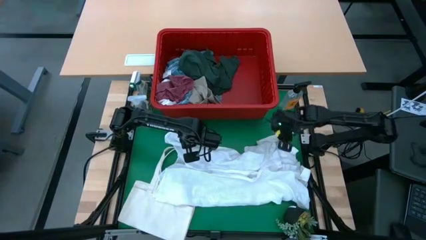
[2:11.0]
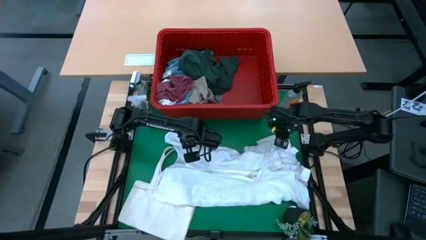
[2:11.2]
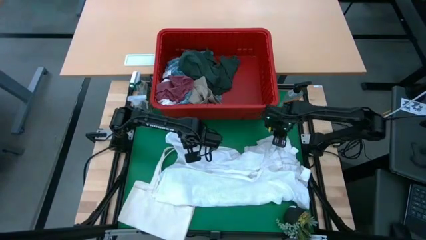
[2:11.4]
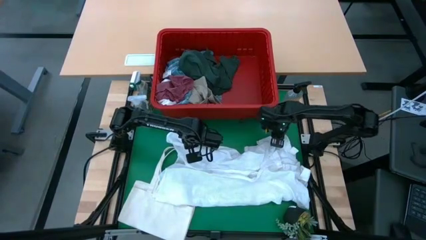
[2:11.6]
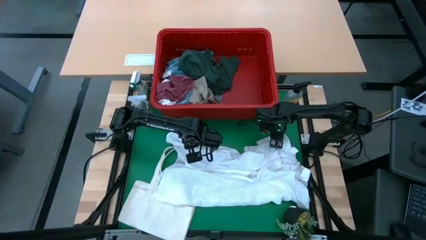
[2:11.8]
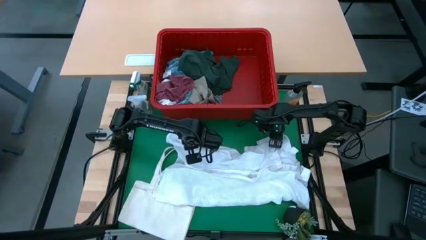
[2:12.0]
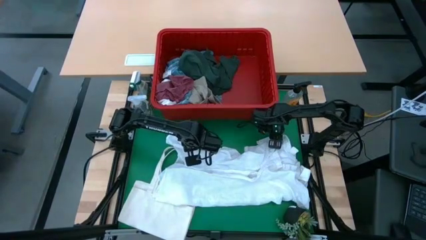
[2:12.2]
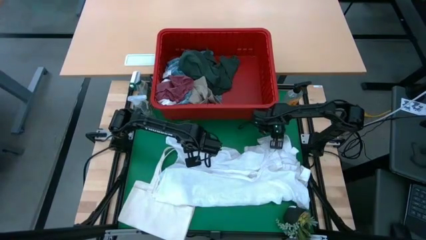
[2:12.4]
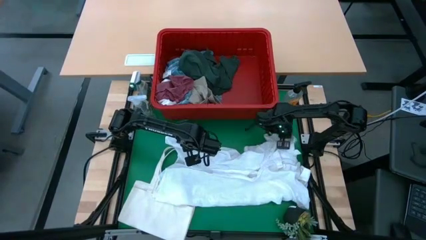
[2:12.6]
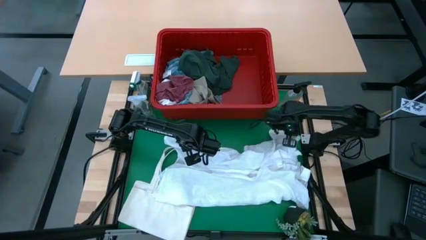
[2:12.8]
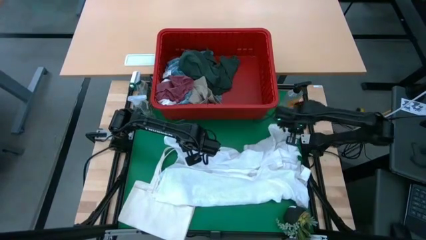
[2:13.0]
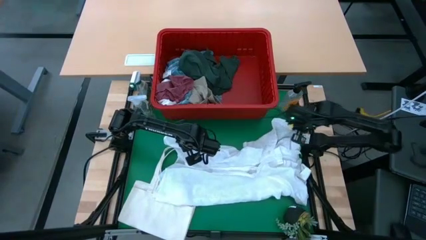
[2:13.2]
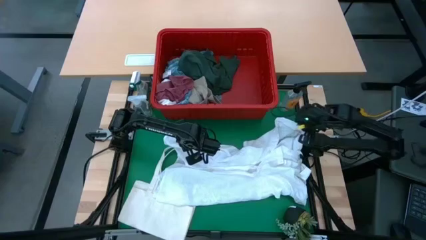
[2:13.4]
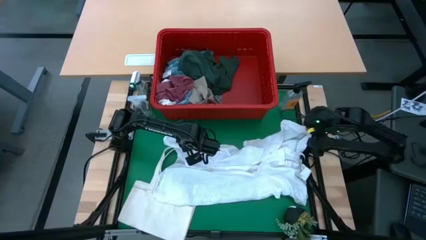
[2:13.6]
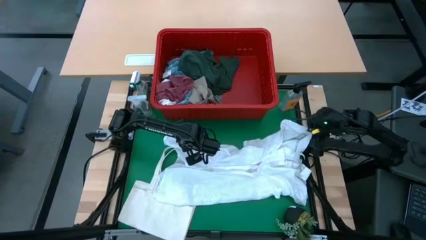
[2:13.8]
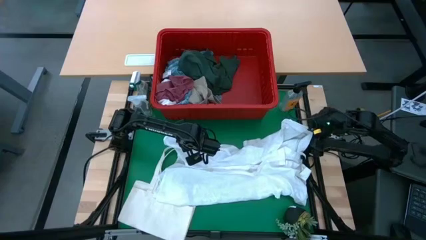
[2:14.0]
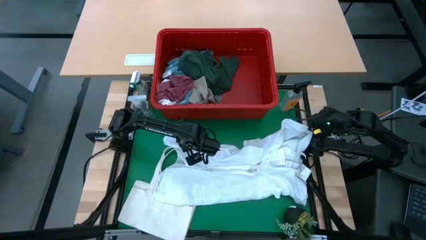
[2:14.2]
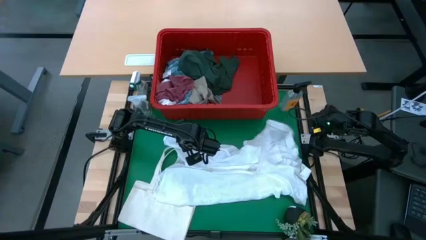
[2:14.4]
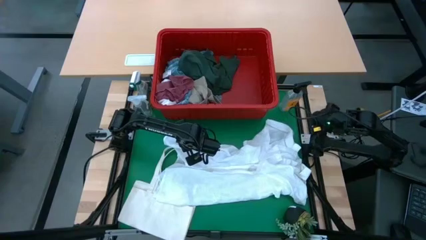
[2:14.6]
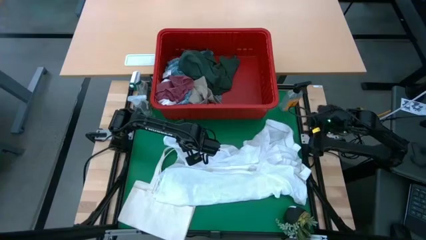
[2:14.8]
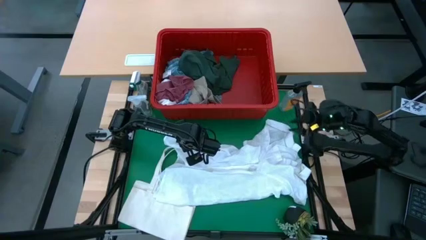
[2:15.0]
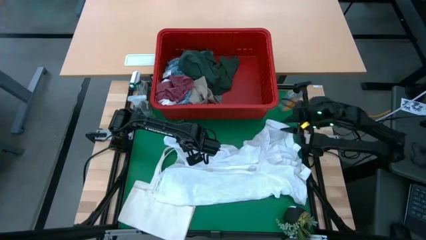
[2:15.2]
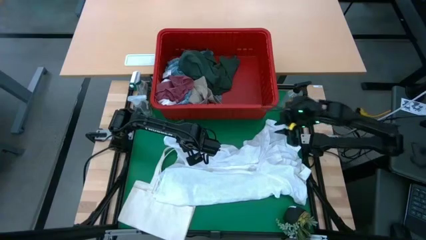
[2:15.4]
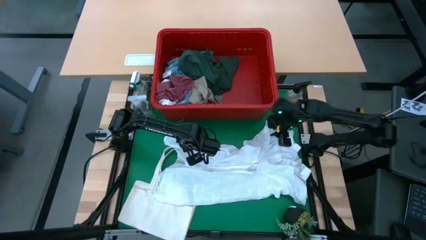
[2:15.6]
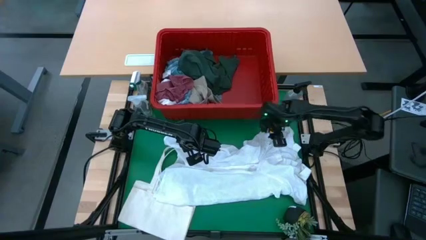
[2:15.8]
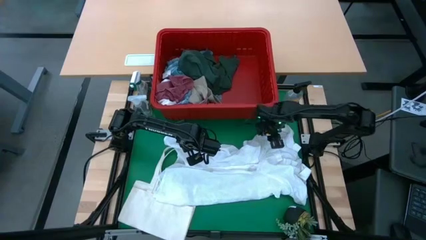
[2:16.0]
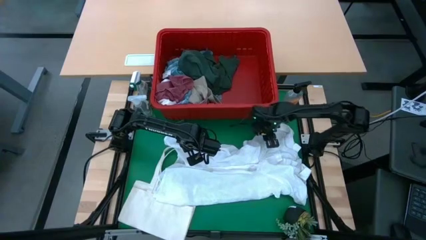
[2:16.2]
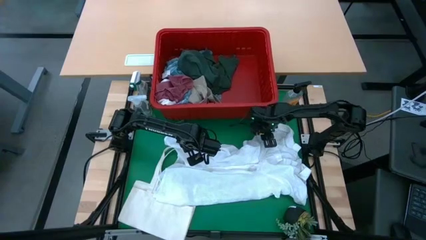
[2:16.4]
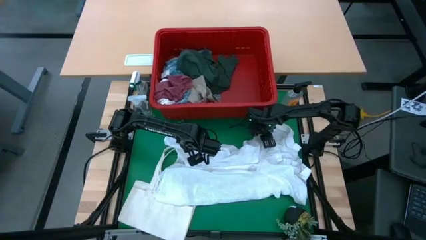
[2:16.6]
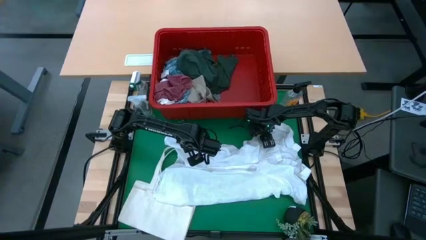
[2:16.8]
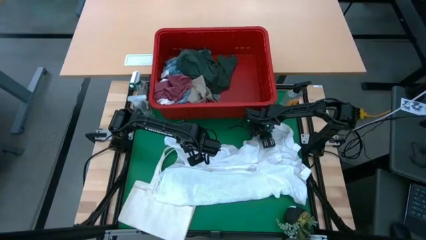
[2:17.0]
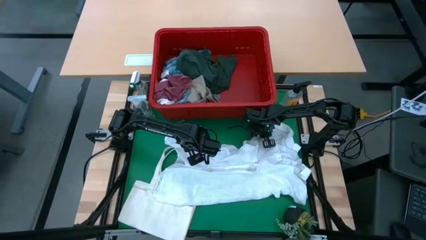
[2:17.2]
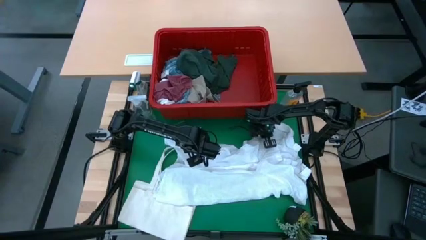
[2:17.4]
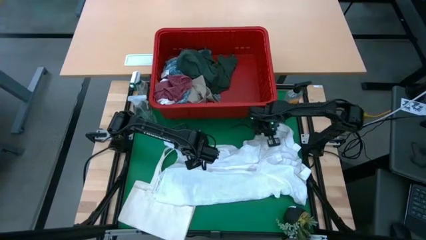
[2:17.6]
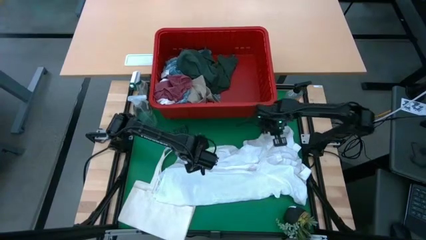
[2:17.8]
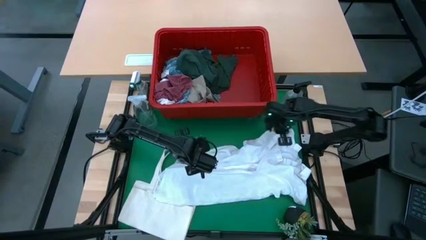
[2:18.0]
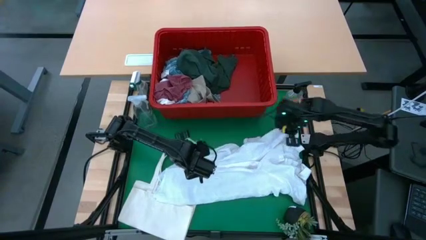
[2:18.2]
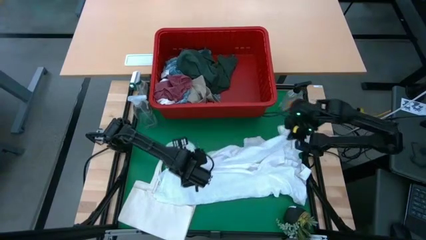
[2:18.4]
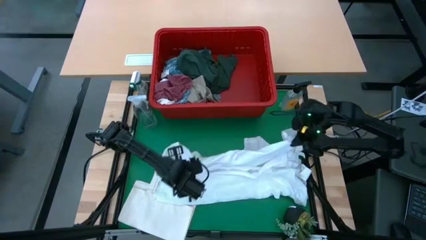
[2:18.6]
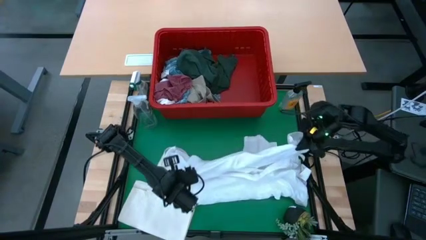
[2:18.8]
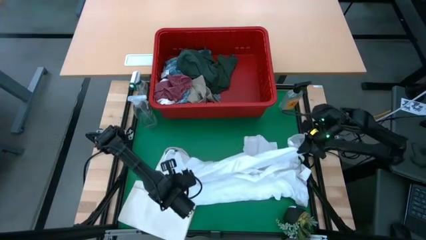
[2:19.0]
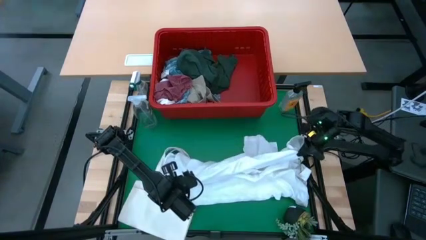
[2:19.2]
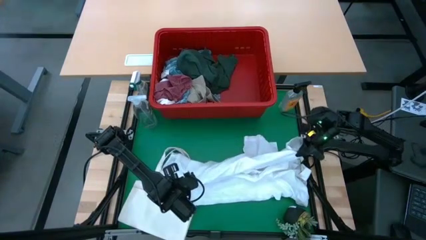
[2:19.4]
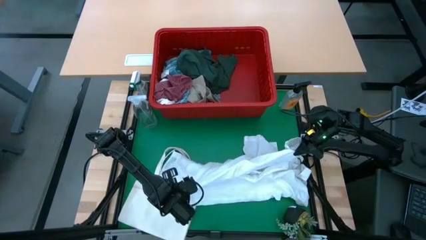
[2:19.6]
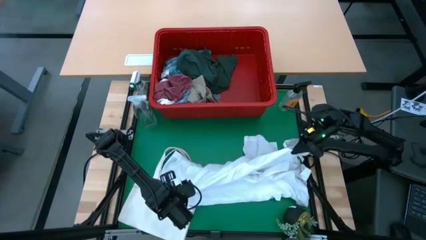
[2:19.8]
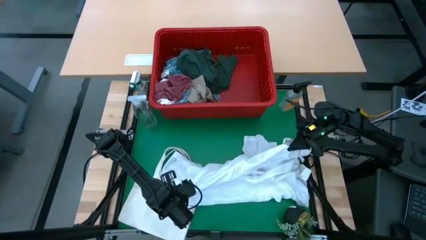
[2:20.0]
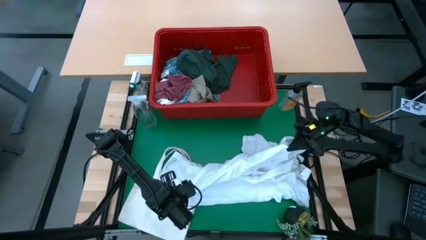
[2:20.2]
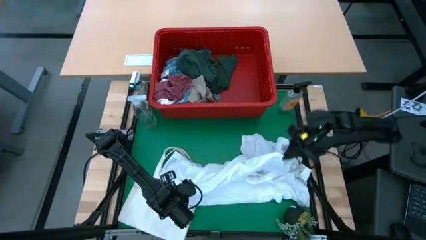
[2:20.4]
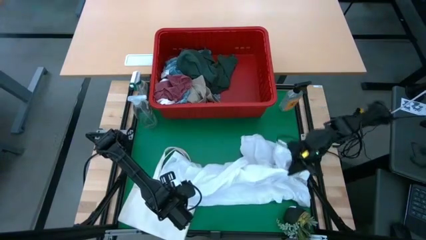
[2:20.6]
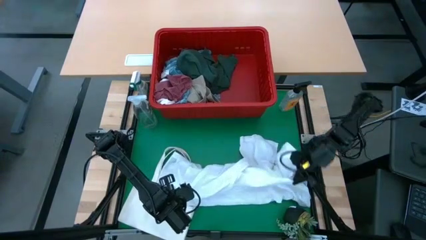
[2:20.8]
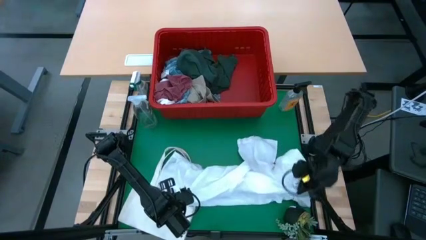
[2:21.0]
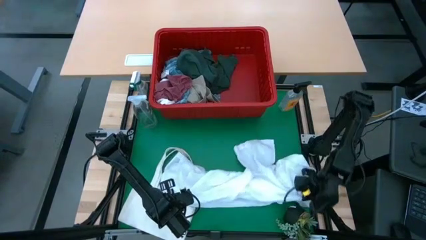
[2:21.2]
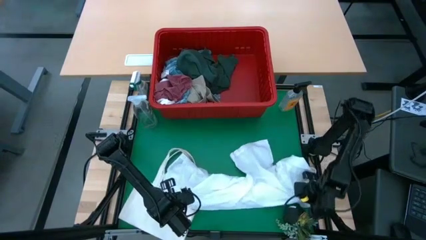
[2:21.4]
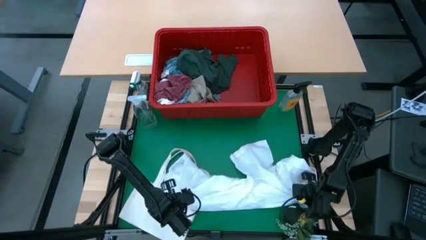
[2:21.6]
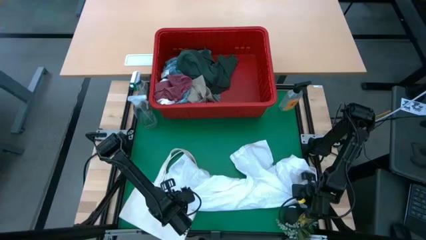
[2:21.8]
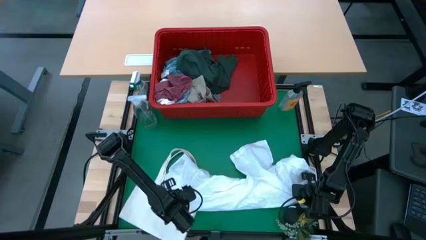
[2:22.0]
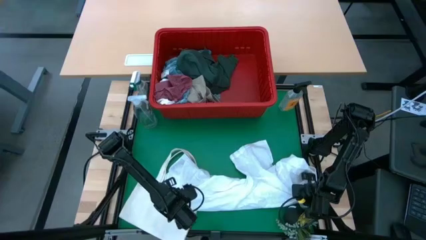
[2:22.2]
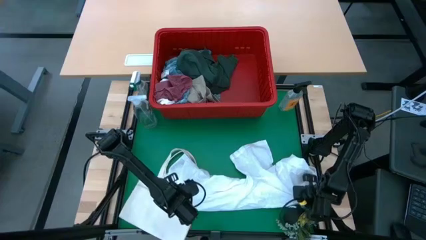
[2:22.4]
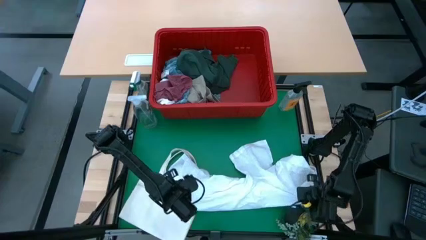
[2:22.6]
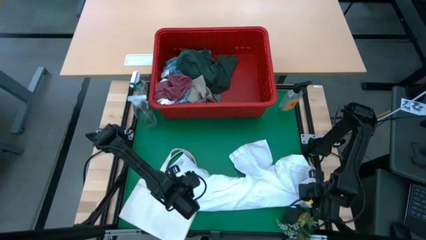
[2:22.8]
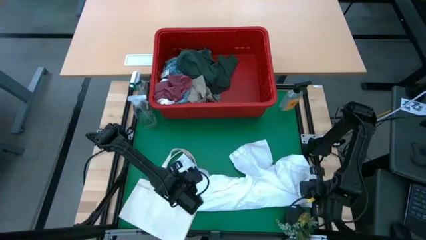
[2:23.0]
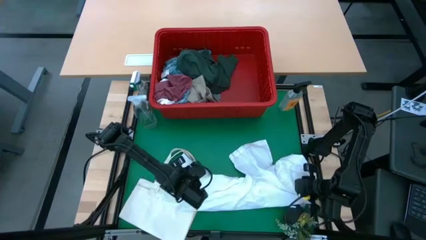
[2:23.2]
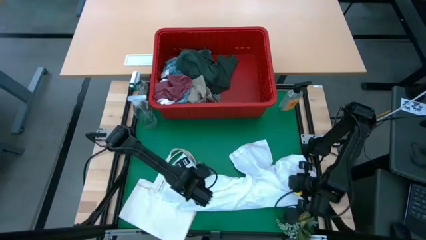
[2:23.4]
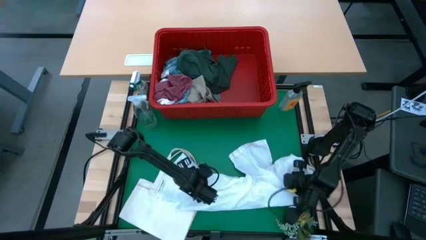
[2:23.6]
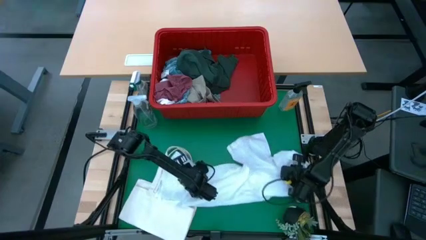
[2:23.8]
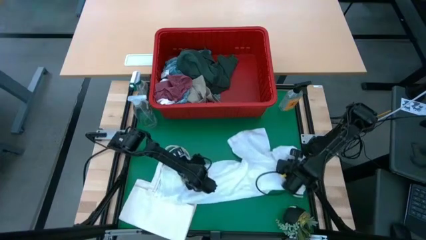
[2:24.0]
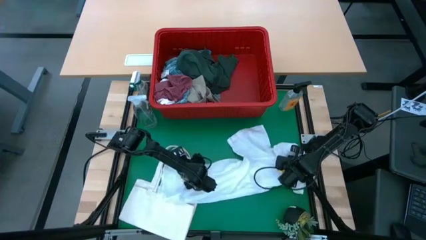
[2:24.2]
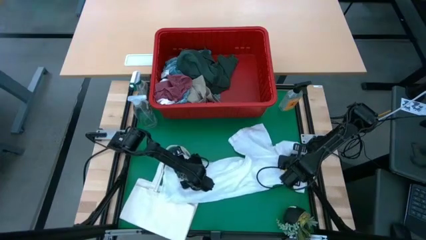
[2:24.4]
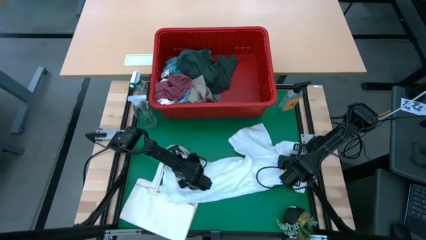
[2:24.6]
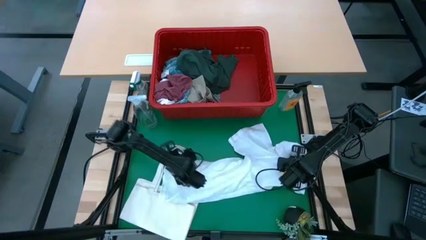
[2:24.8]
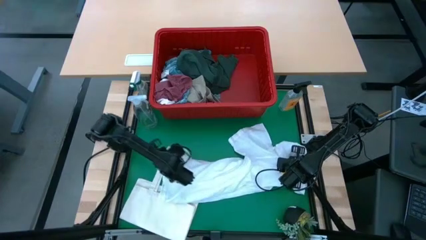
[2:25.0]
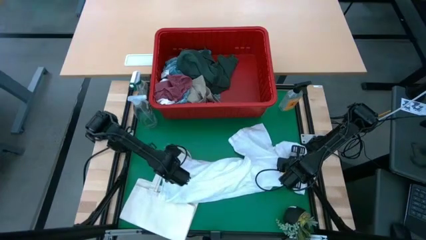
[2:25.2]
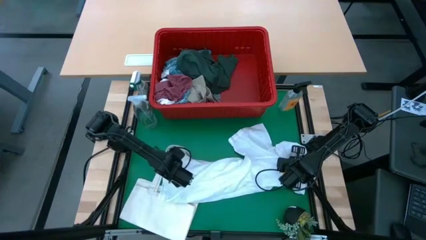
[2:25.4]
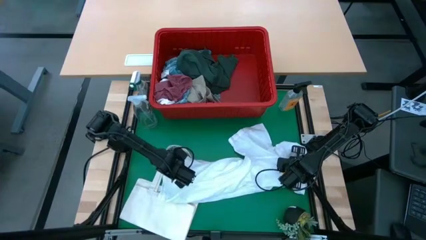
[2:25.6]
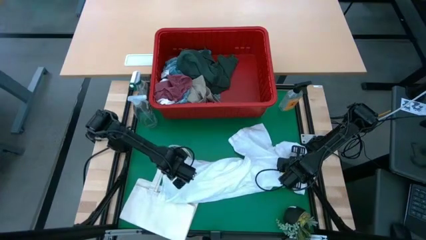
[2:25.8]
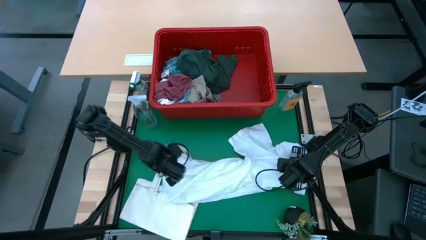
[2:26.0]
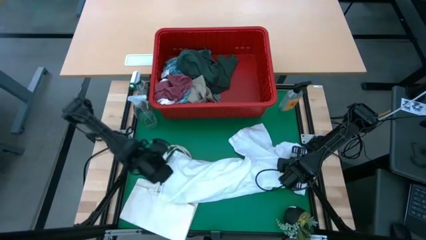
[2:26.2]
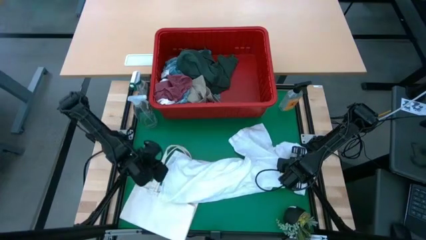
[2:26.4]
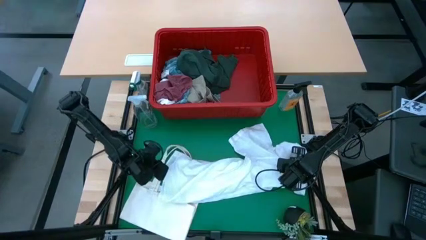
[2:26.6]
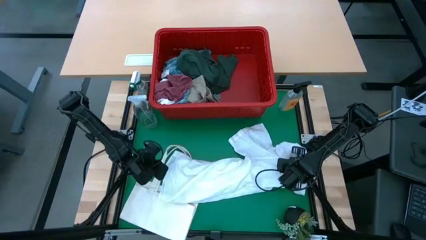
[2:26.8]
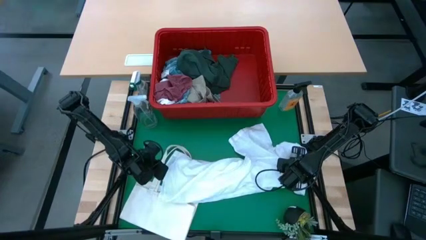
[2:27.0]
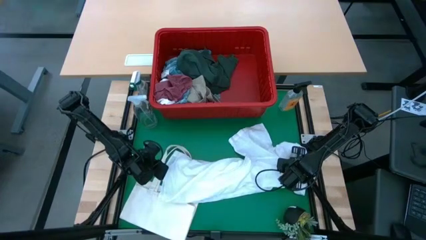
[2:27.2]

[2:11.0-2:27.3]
Task: Fold Laundry from Bin
Fold the white polo shirt
